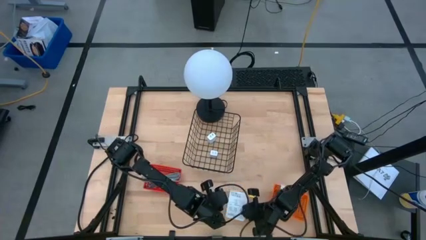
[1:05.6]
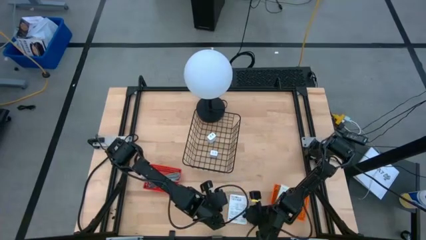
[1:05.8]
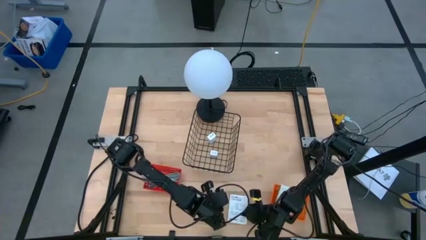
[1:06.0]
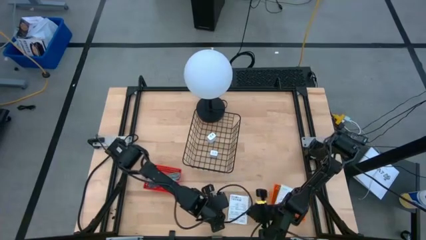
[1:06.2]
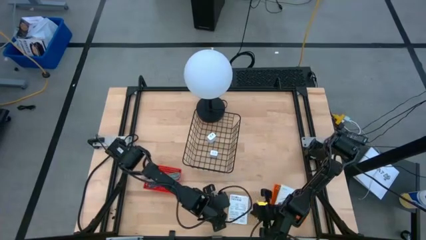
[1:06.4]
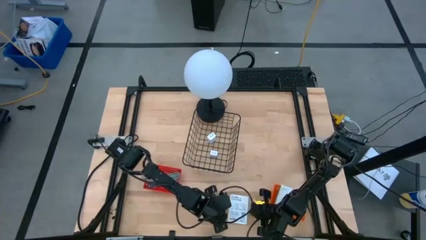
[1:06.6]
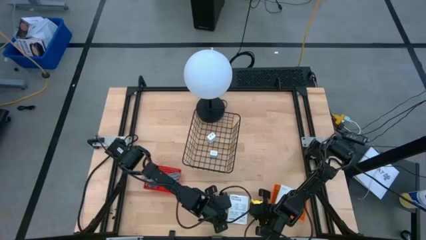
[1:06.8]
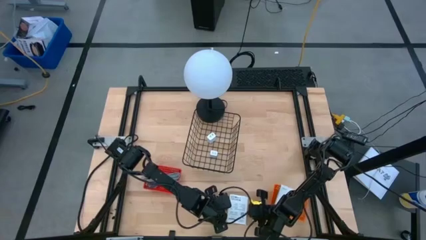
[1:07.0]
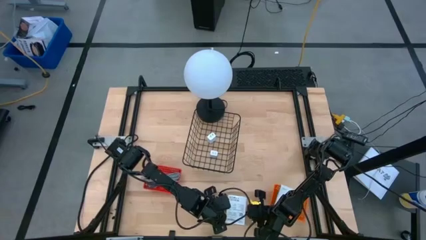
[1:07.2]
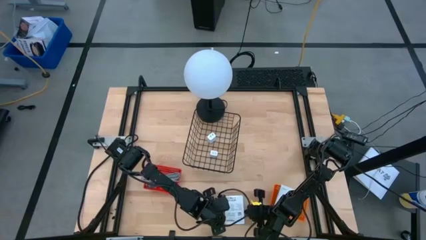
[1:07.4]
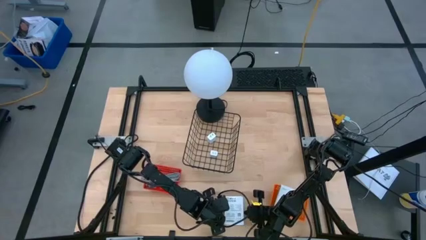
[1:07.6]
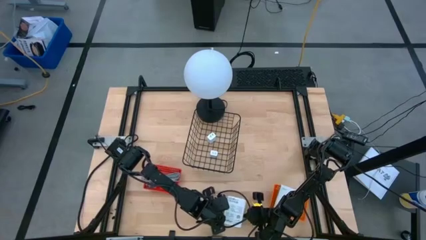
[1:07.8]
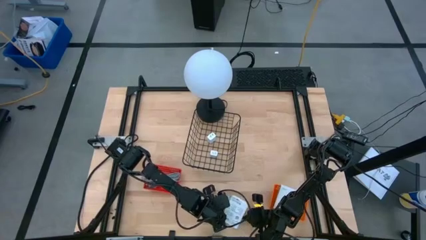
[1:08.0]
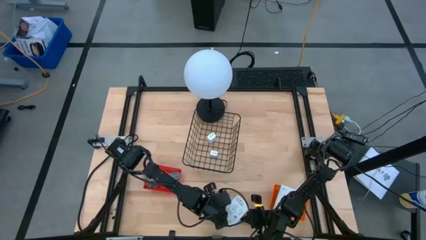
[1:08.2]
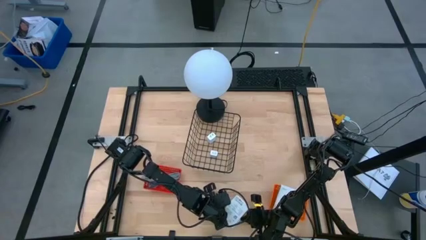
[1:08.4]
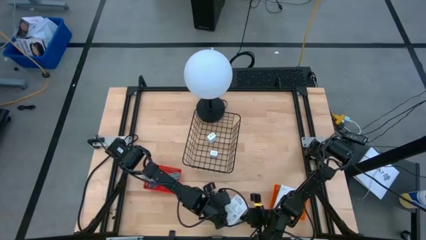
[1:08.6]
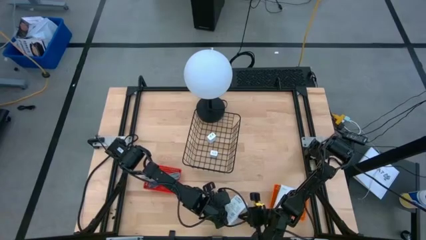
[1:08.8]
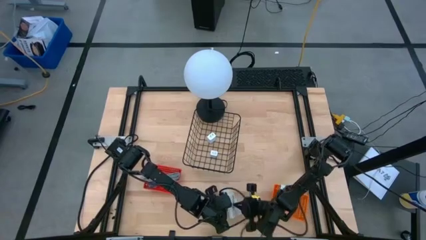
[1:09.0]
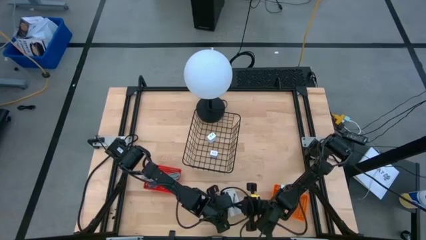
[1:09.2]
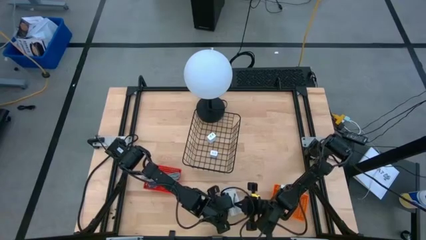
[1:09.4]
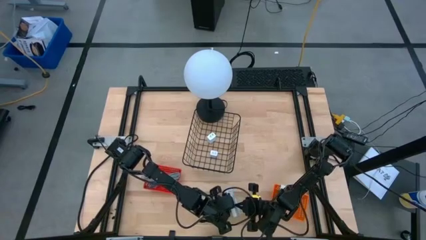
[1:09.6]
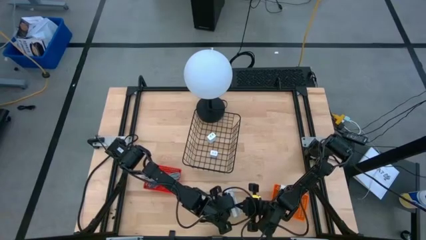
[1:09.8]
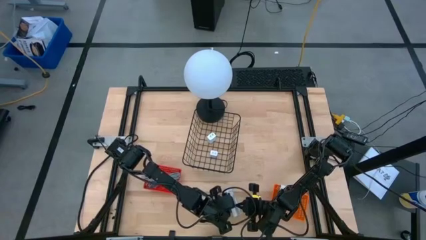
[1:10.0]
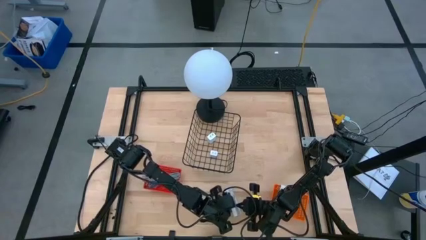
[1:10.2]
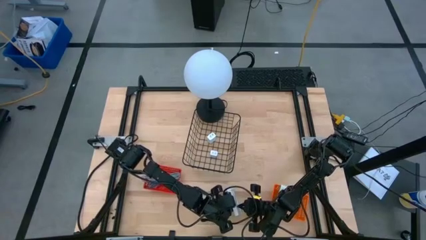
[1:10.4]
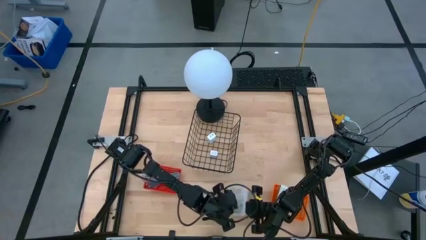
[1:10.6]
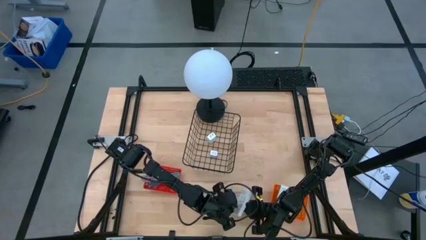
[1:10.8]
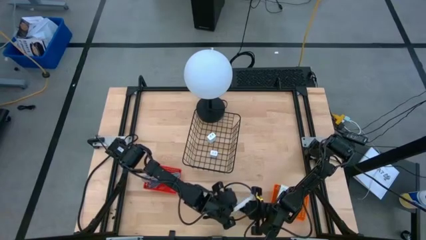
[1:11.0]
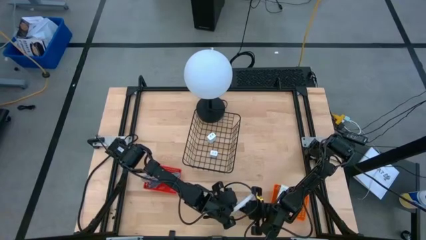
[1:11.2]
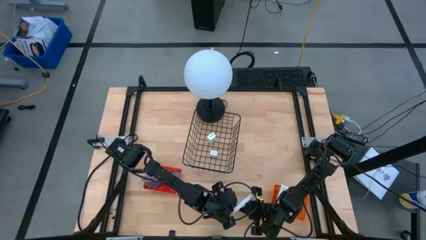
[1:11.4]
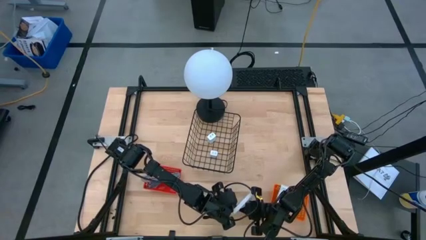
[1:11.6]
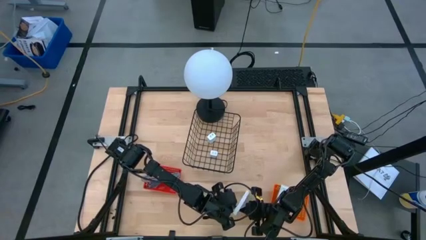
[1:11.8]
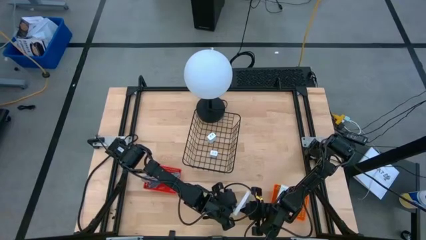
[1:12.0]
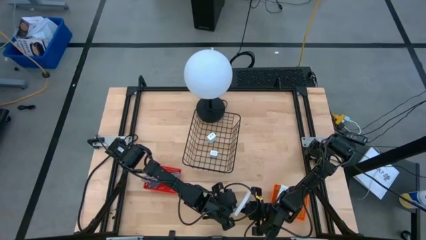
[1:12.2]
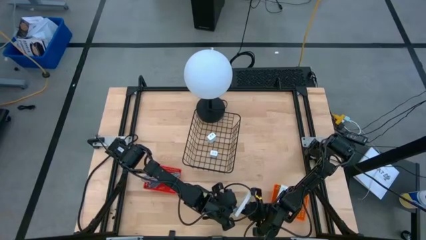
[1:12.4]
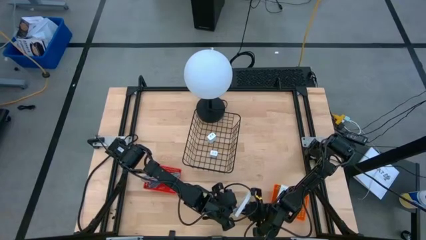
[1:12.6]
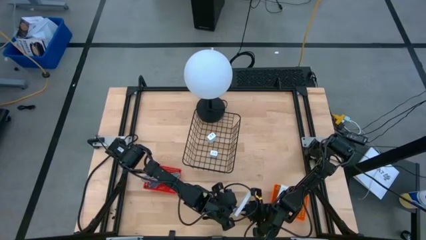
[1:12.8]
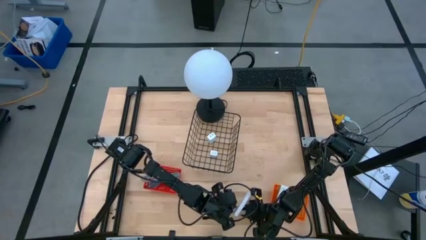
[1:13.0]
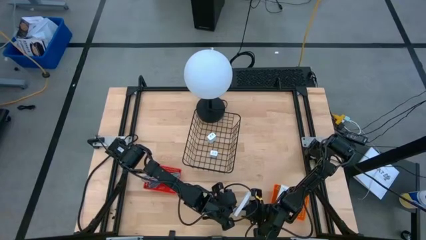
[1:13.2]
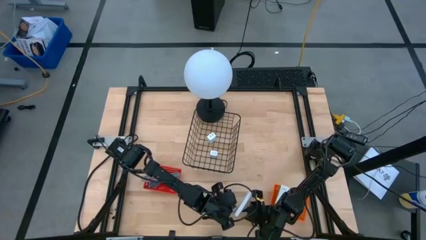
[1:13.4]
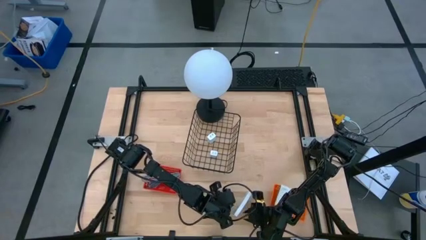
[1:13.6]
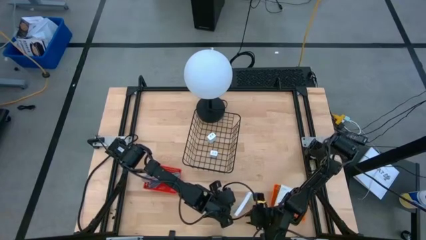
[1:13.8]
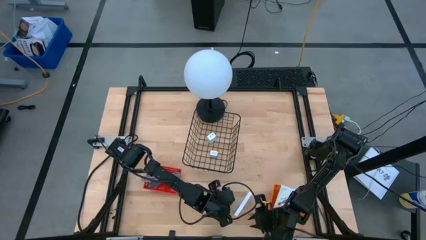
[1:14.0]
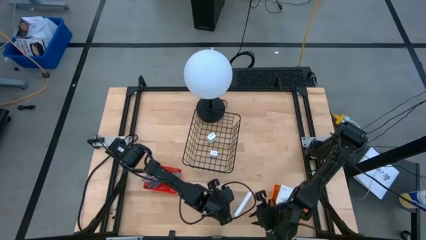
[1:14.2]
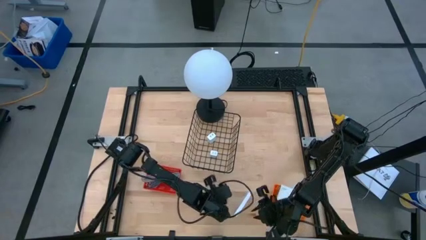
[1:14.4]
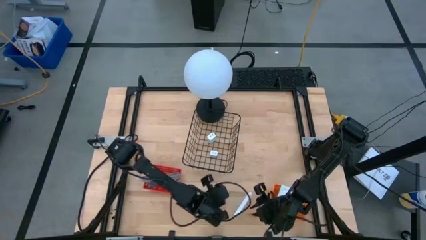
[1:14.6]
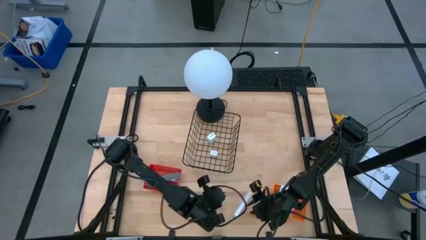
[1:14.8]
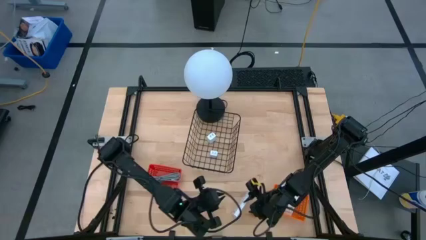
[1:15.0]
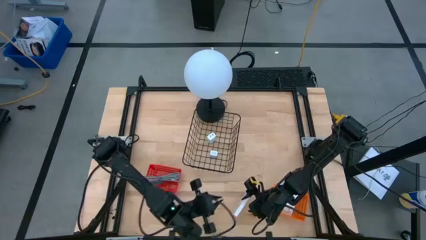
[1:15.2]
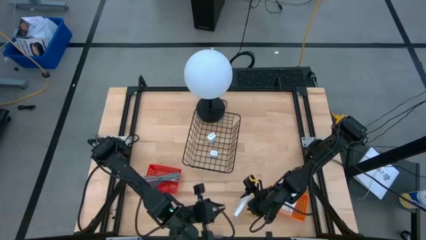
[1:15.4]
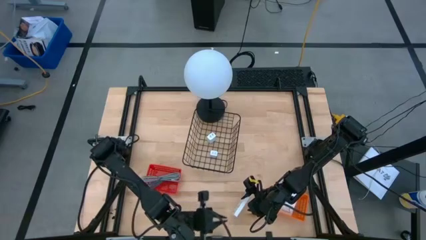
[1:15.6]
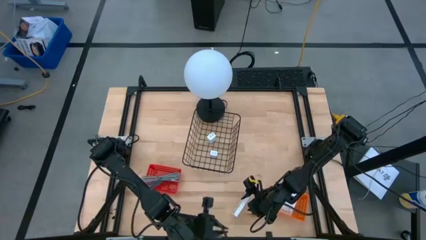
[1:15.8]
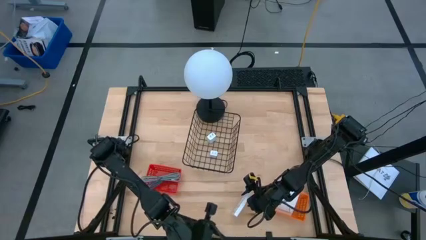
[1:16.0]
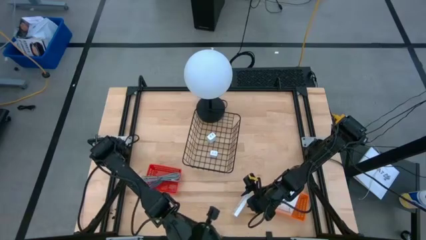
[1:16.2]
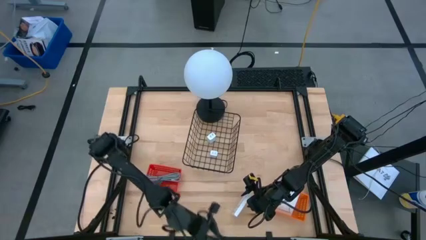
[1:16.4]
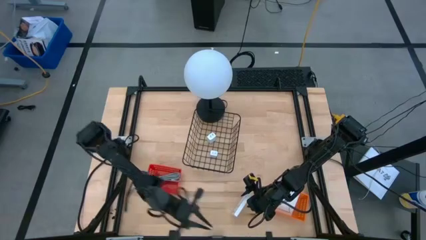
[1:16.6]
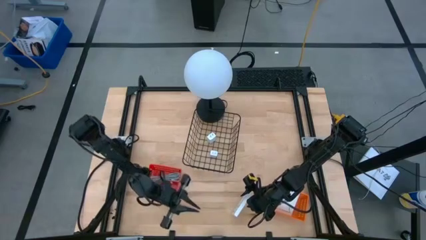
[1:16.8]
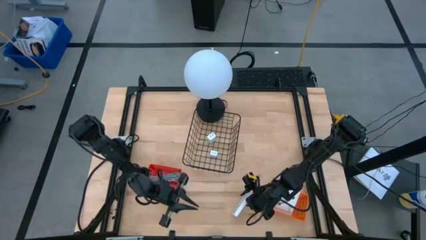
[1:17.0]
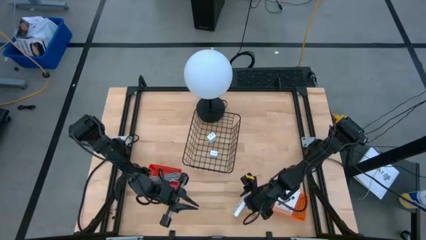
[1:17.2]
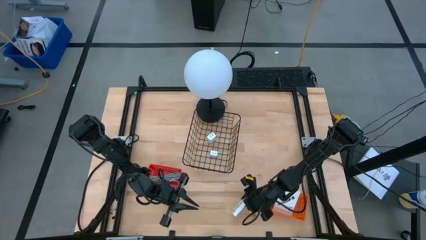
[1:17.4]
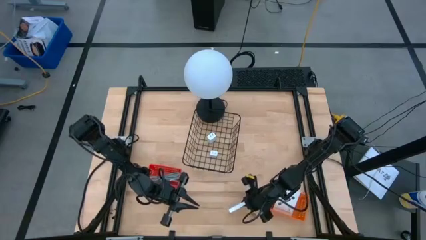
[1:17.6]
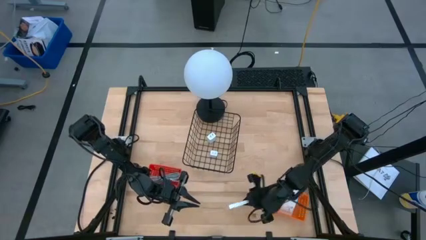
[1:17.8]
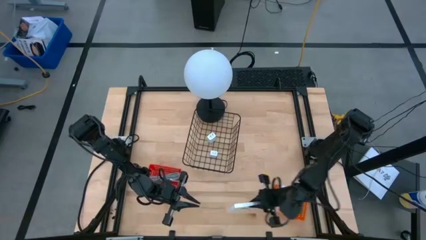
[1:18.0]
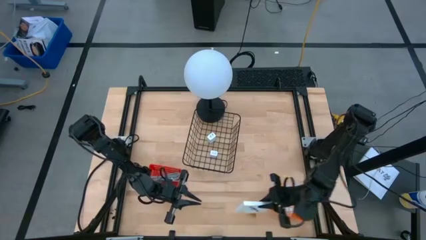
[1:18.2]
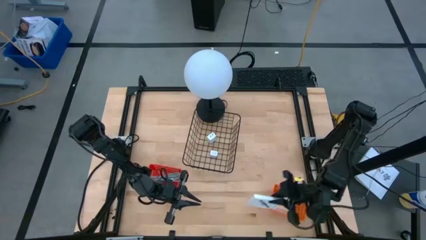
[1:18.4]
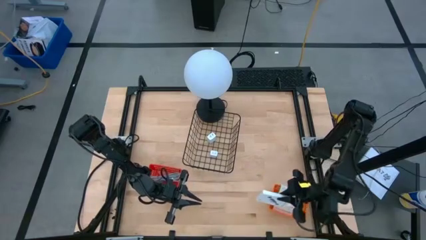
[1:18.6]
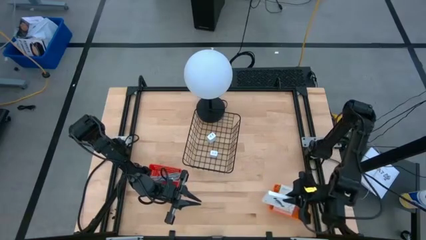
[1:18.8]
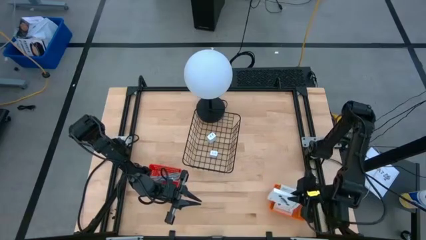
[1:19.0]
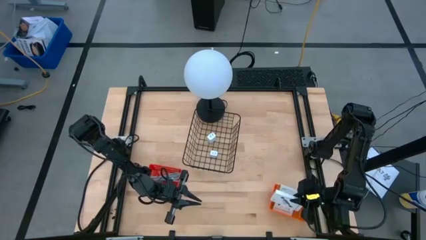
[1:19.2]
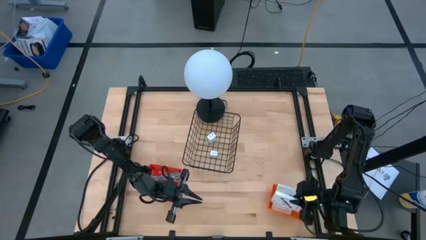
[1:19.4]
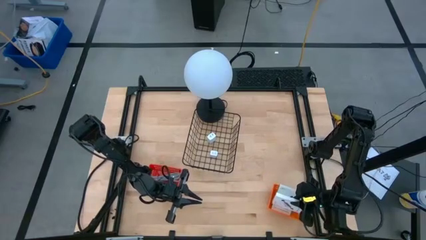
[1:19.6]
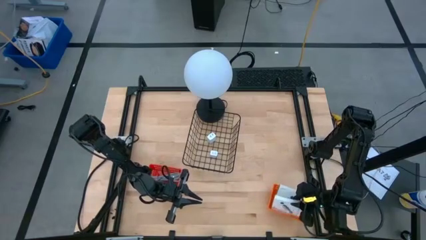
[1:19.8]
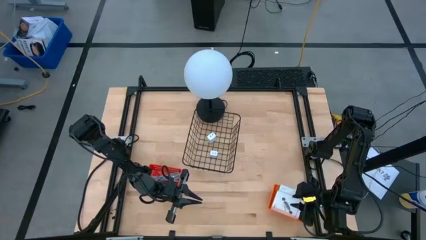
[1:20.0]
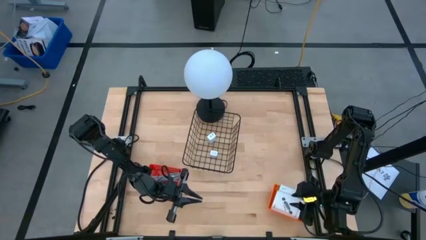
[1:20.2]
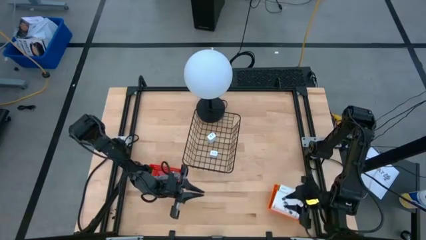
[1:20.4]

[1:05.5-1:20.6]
Task: Pick and place items into bin
Put the card reader box into the orange bin

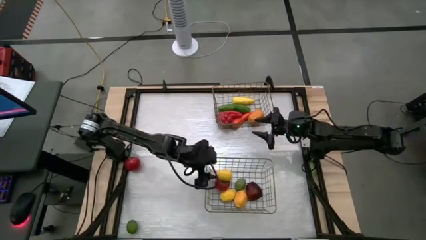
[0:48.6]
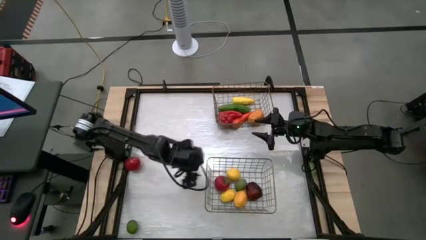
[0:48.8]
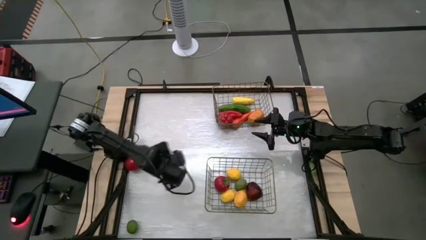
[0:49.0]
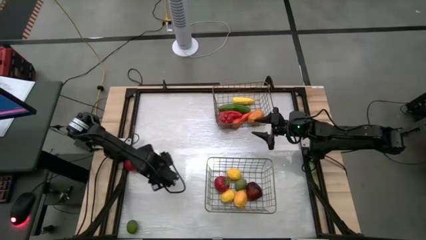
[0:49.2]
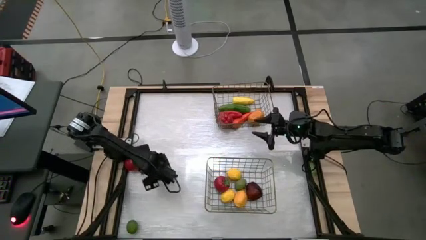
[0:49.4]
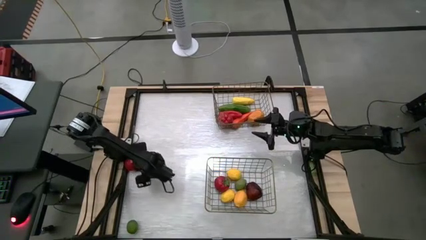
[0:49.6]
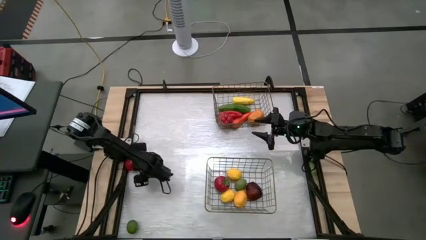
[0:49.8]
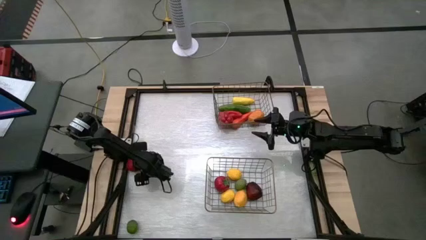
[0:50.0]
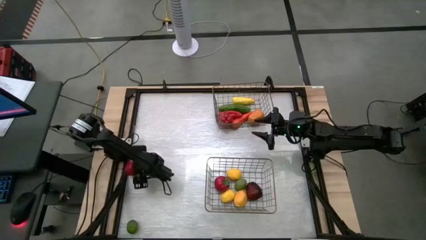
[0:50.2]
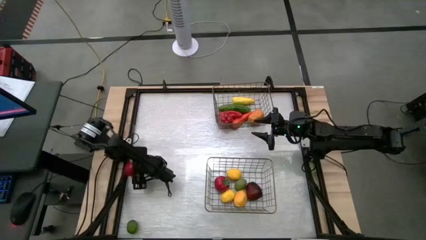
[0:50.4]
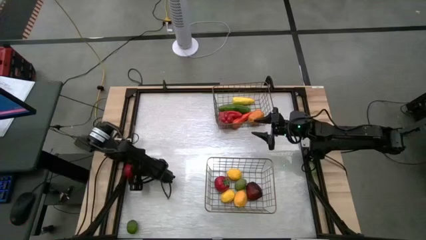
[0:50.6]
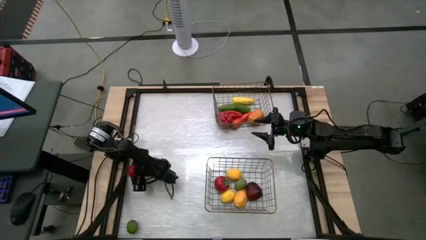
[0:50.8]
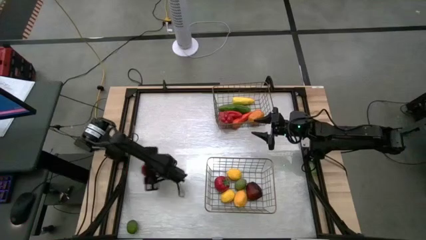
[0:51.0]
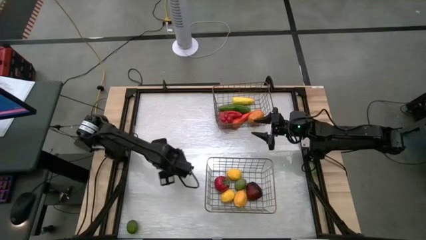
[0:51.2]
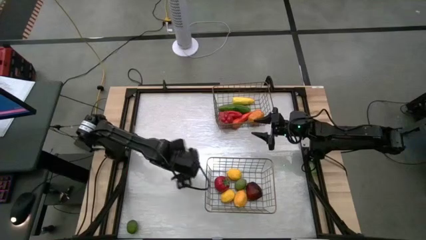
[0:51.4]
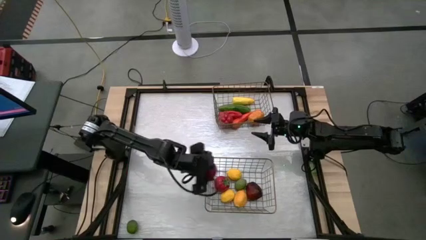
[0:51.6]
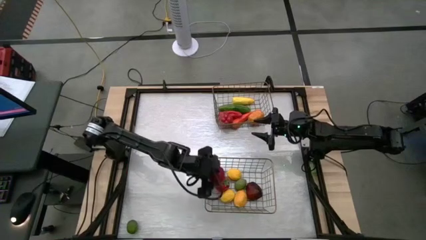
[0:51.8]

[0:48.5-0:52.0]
Task: Sort produce into baskets
Put the red tomato into the bottom wire basket
